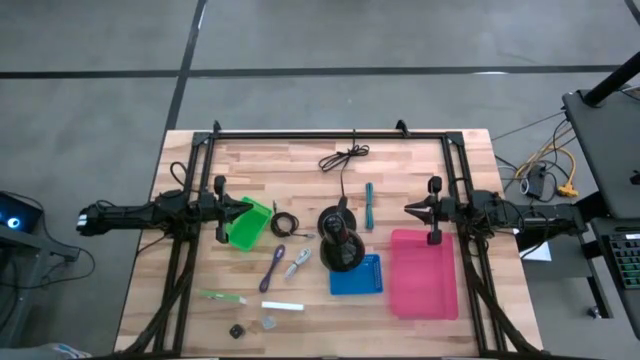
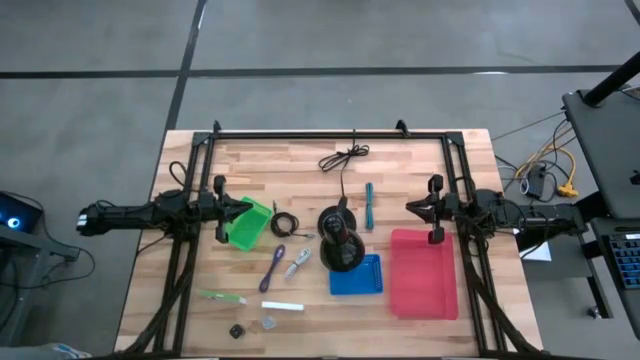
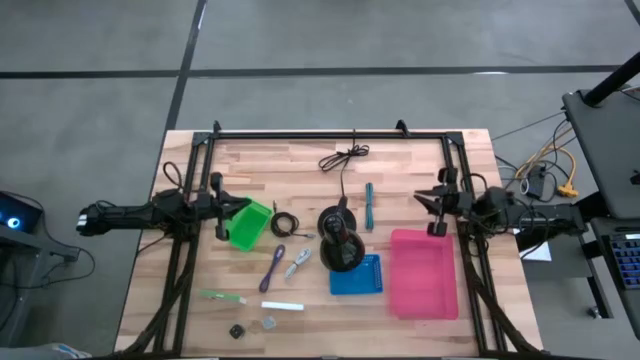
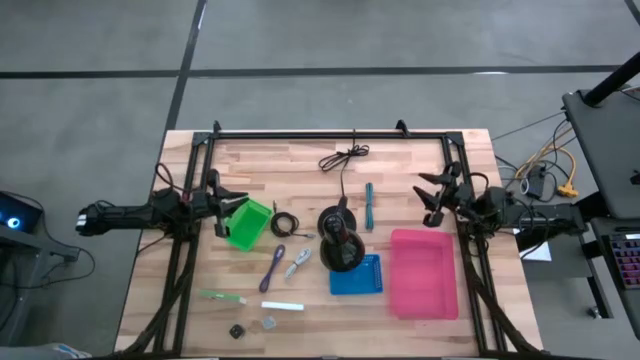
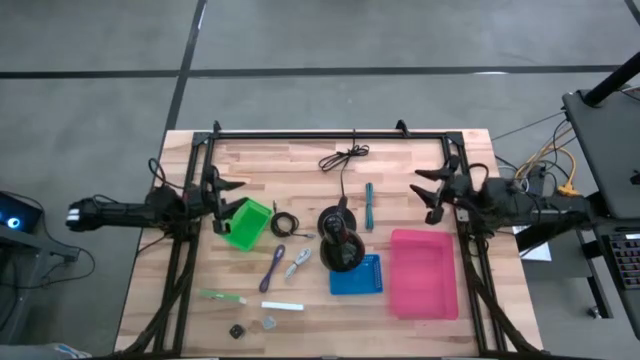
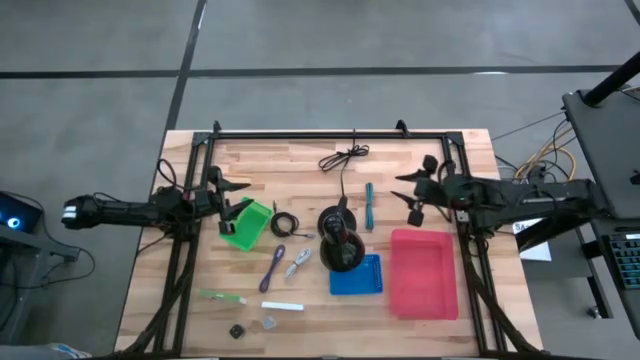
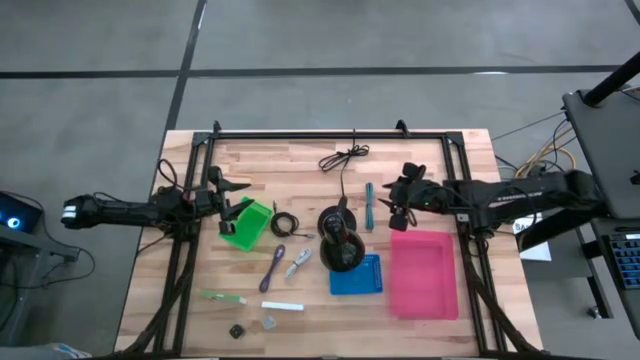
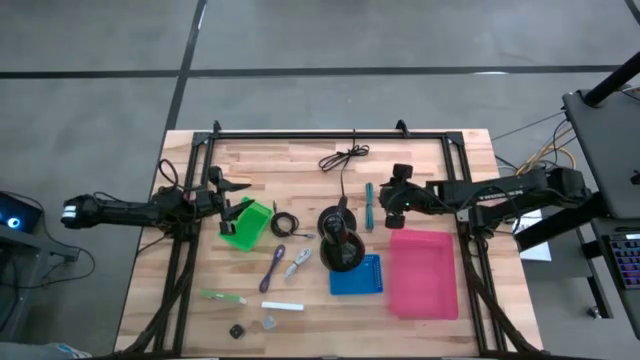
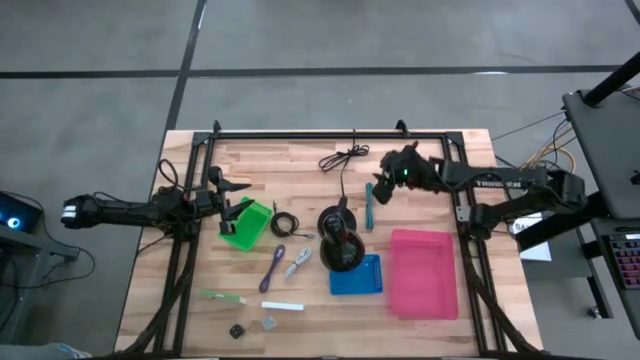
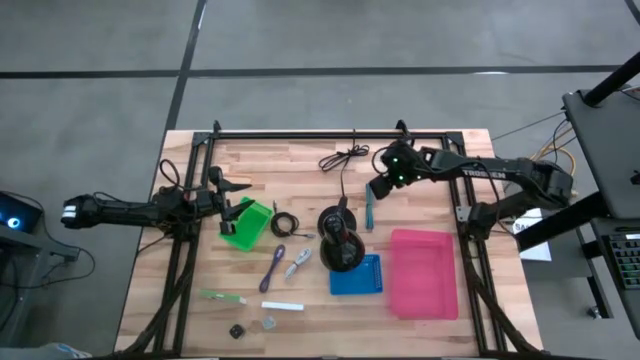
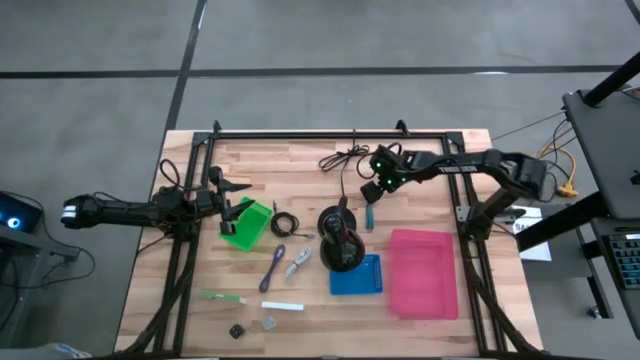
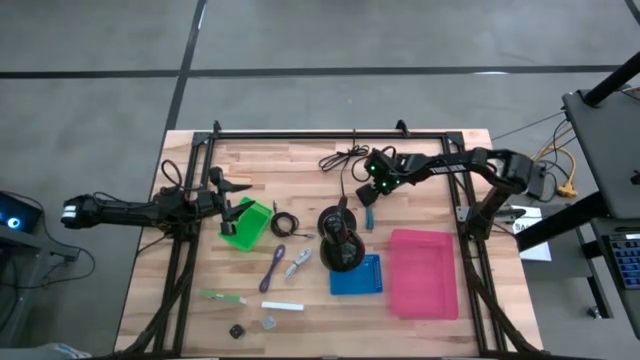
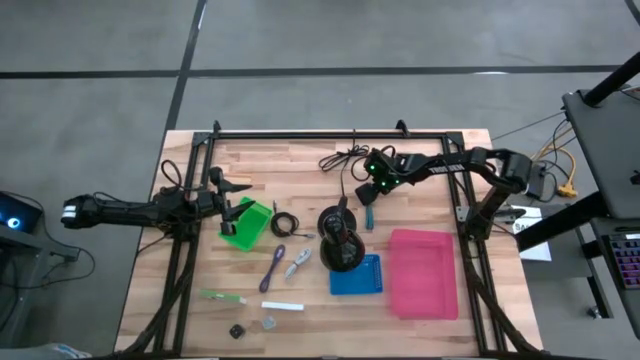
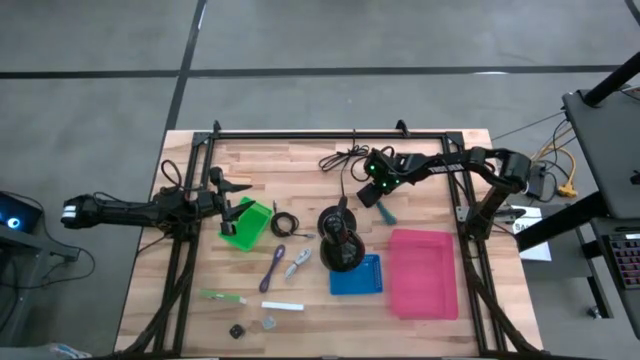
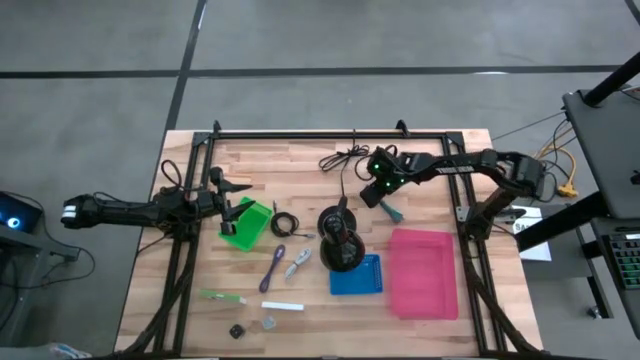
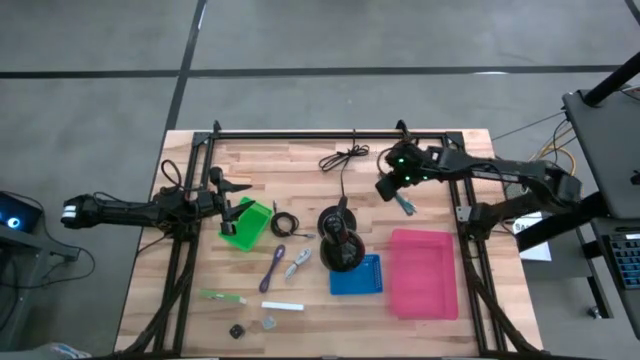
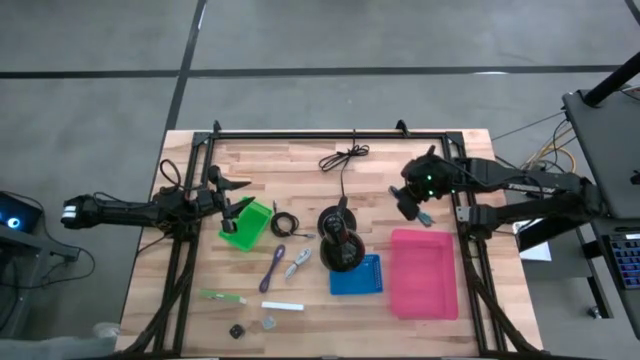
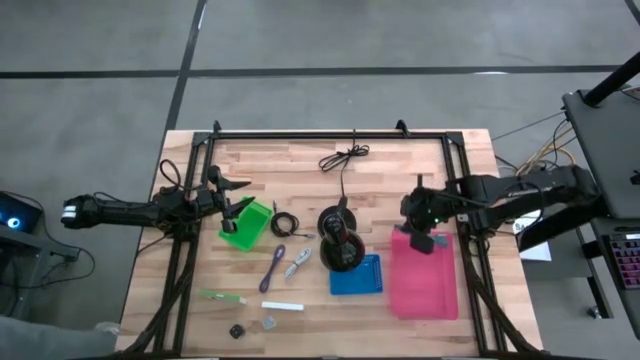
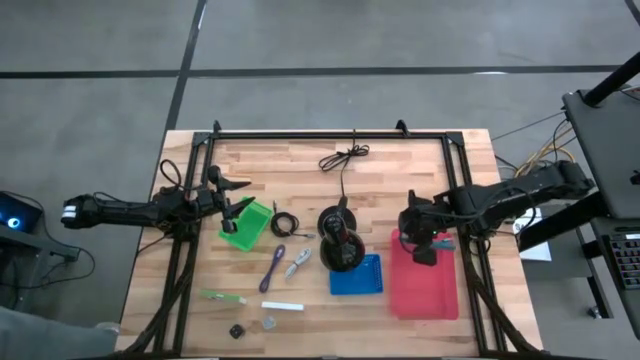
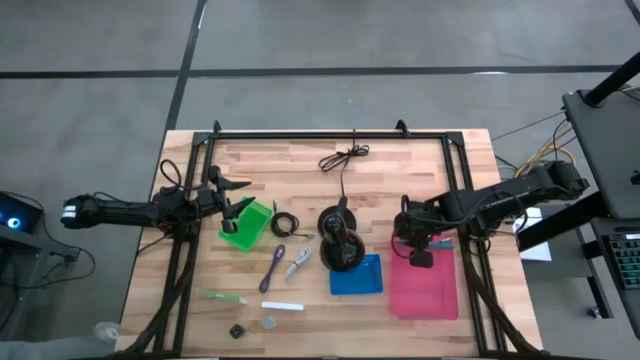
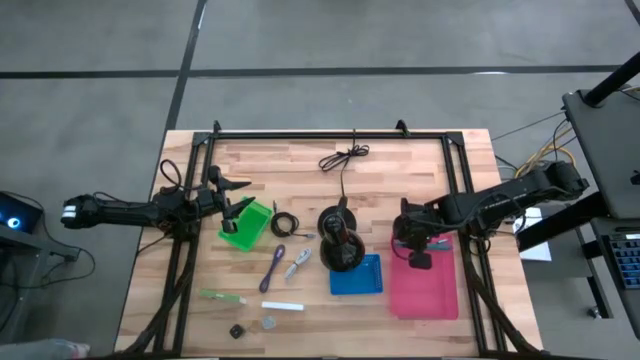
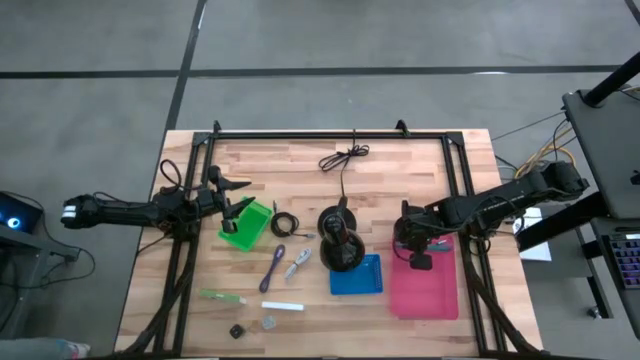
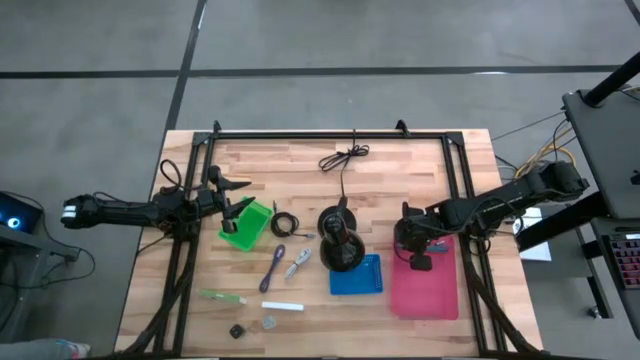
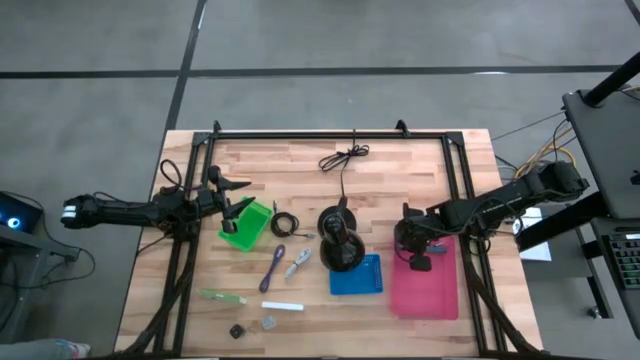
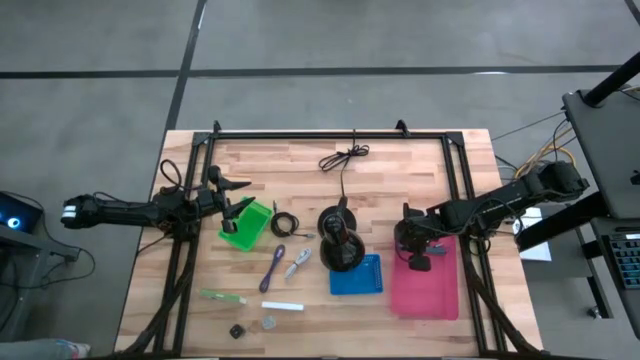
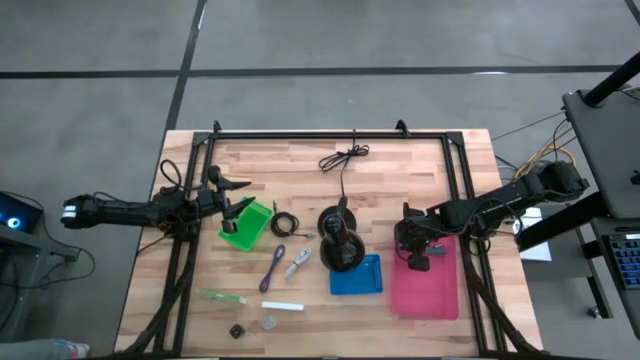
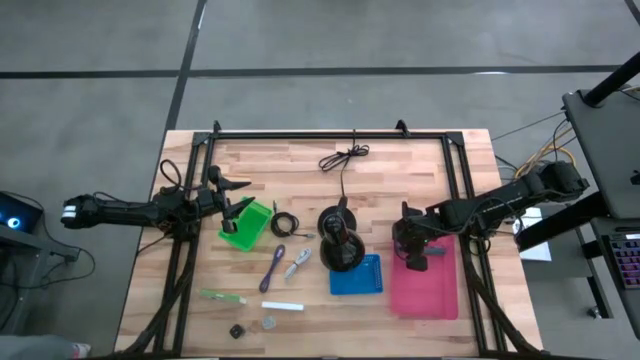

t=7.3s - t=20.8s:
Task: Pick and place items into bin
Put the blue charger cable into the pink bin

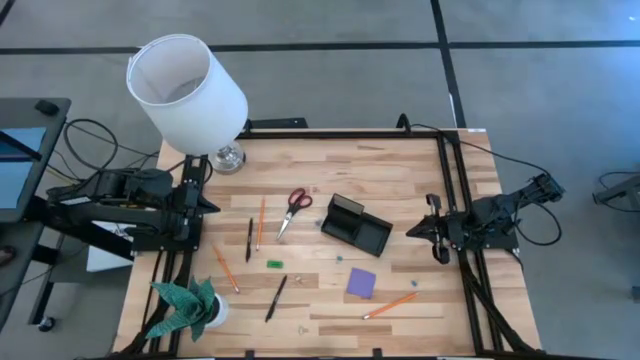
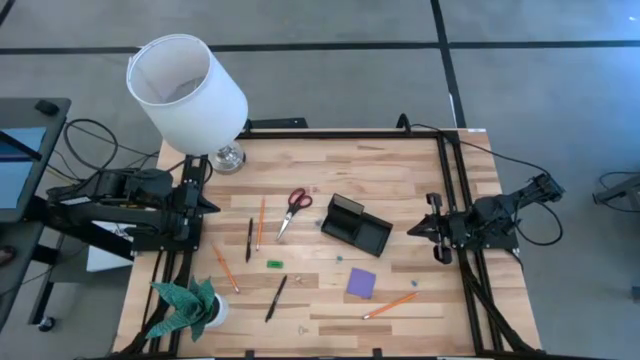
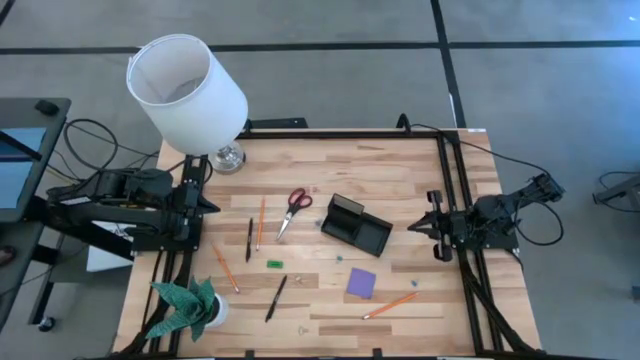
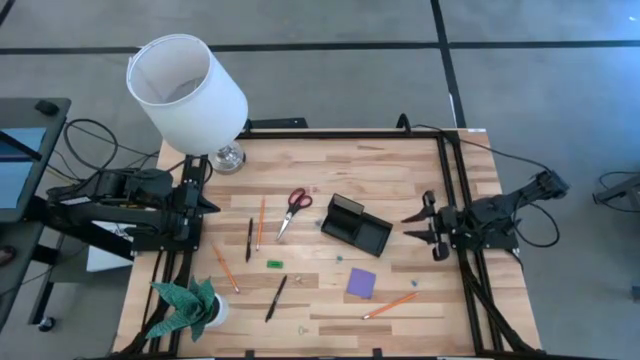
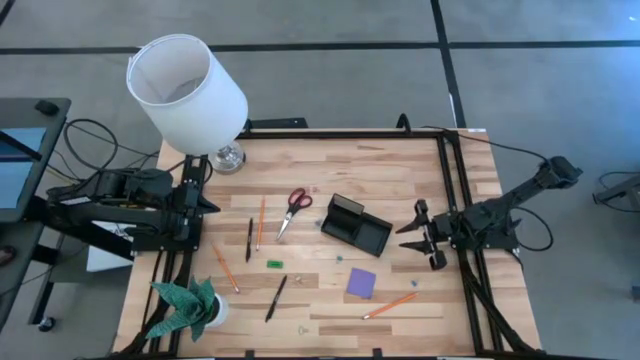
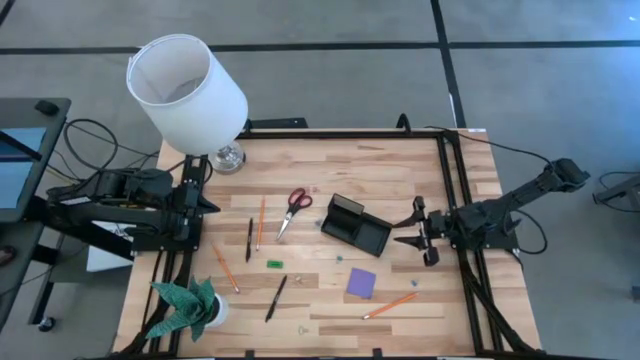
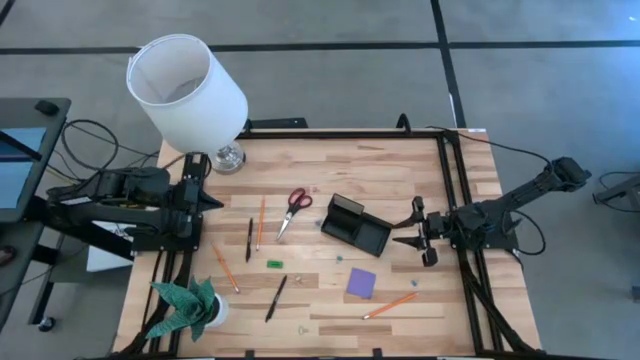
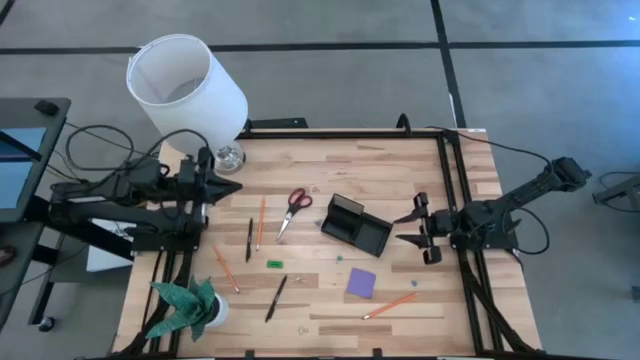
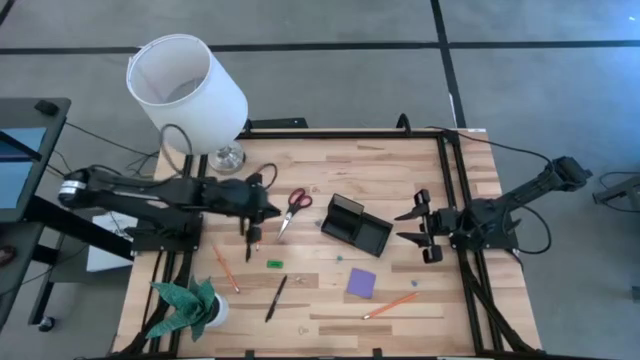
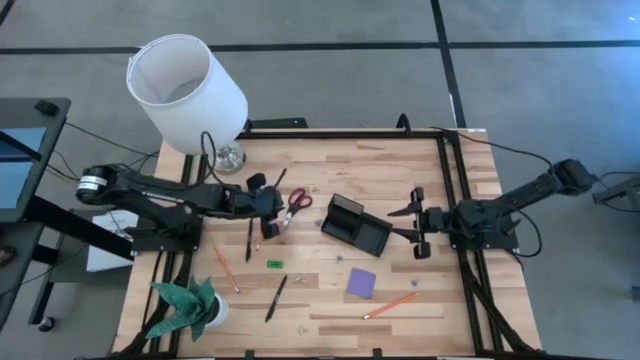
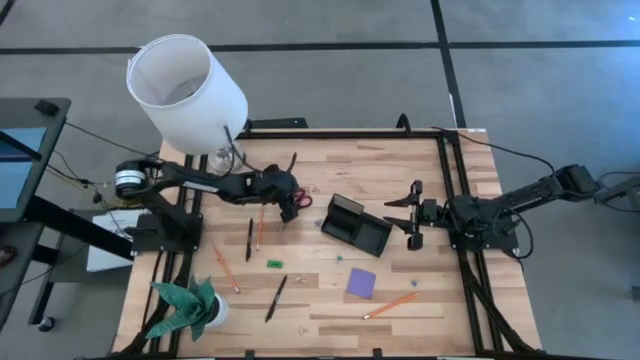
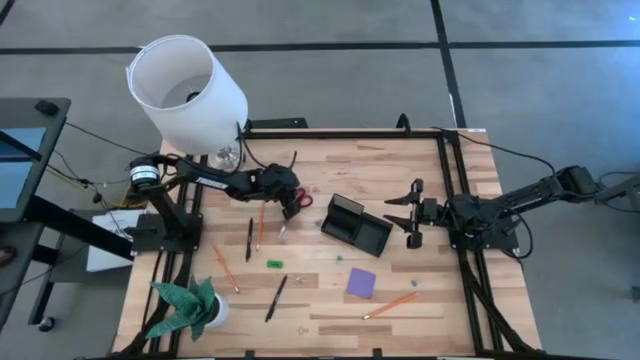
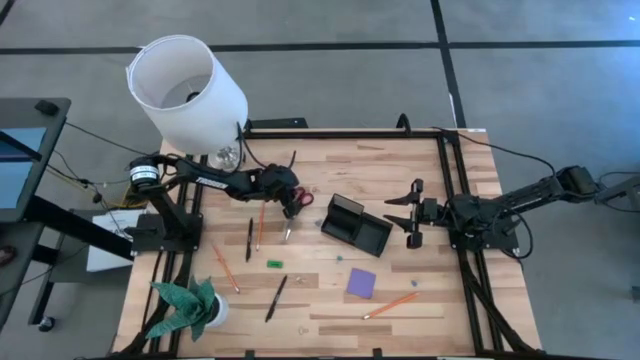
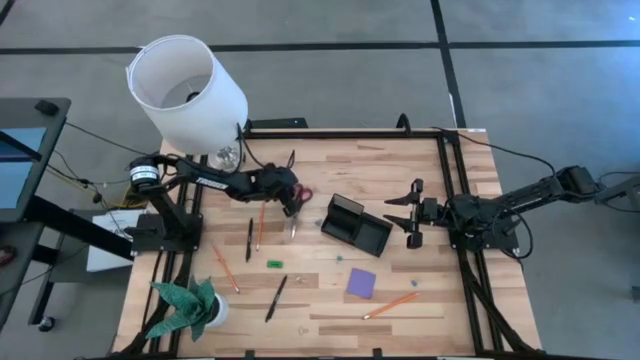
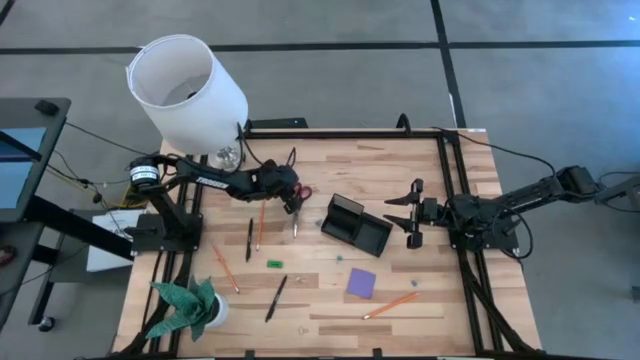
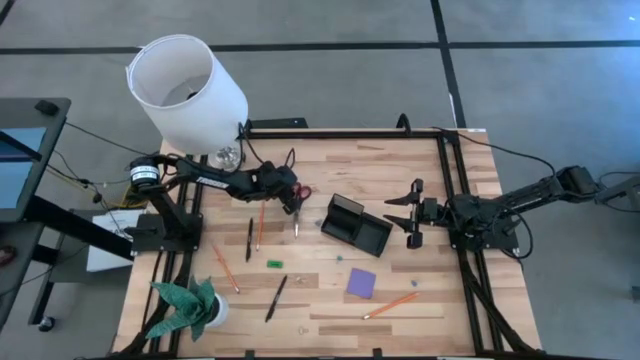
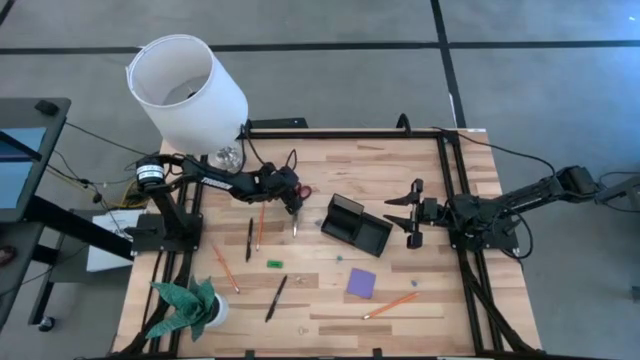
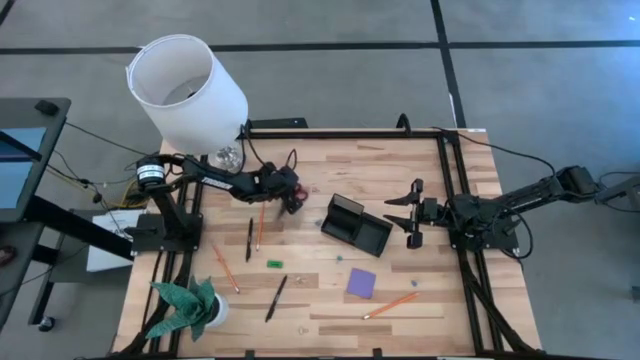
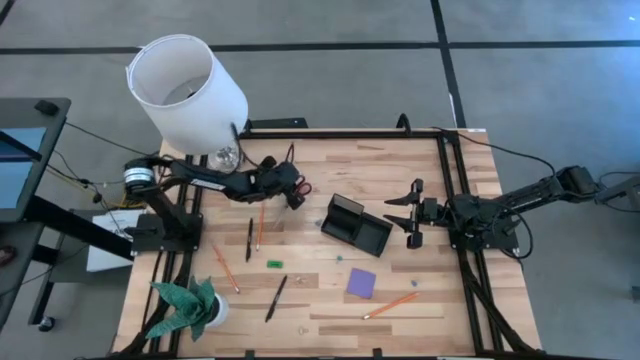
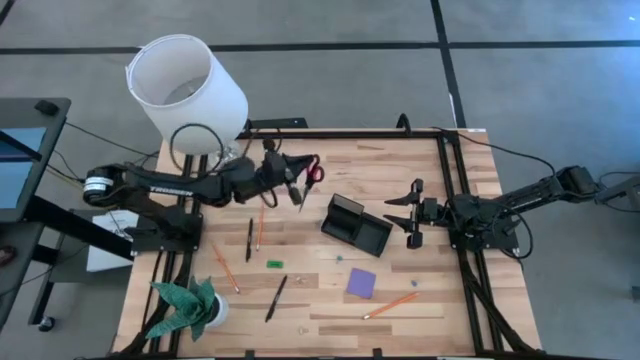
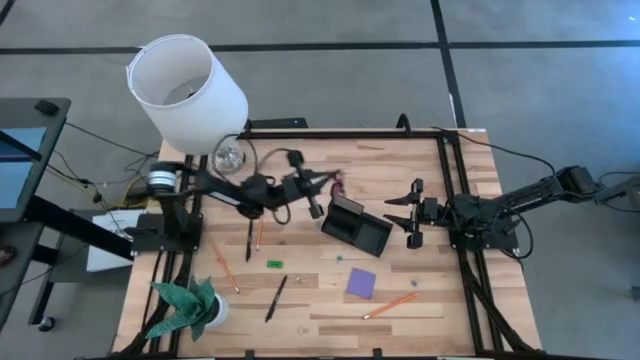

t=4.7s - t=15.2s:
Task: Pick and place office supplies into organizer
Put the black scissors into the black desk organizer
